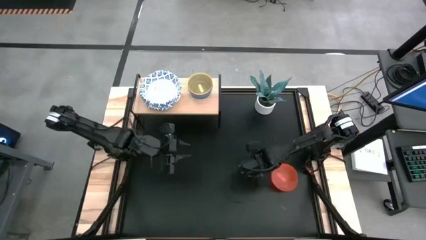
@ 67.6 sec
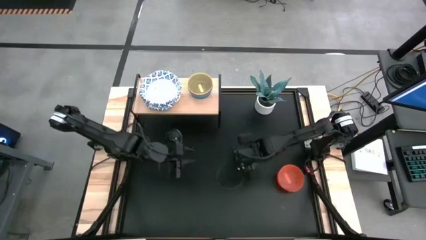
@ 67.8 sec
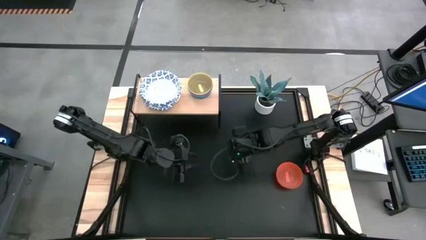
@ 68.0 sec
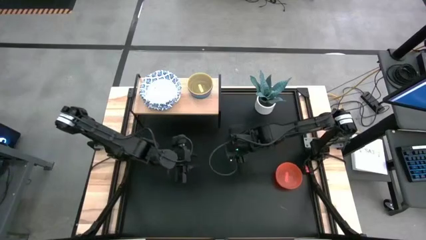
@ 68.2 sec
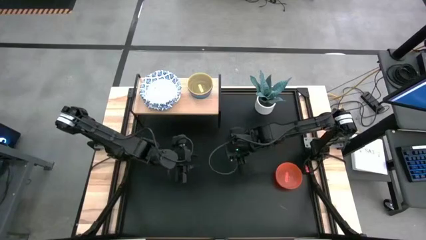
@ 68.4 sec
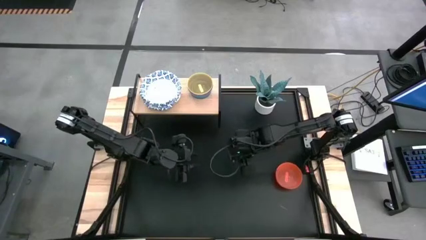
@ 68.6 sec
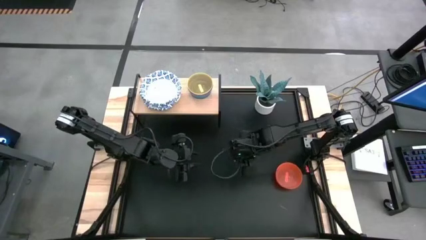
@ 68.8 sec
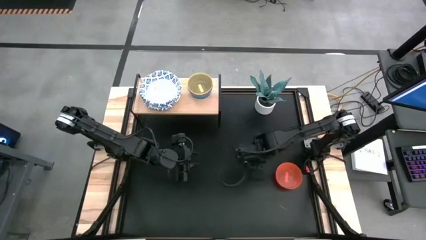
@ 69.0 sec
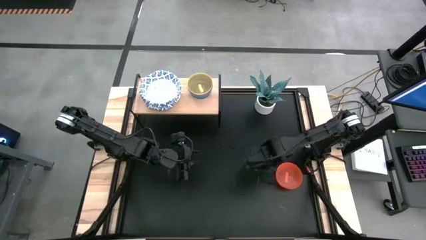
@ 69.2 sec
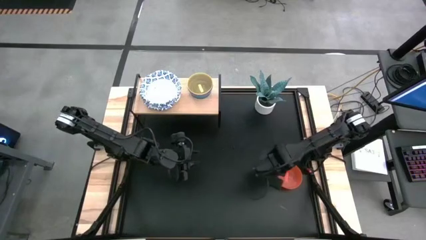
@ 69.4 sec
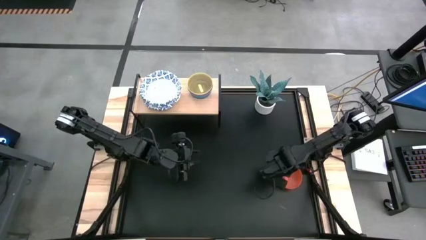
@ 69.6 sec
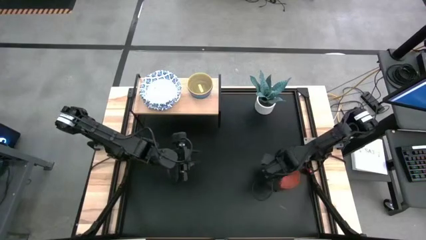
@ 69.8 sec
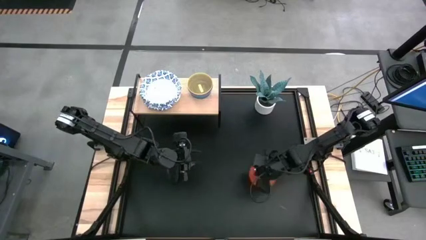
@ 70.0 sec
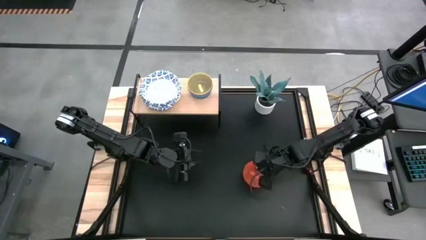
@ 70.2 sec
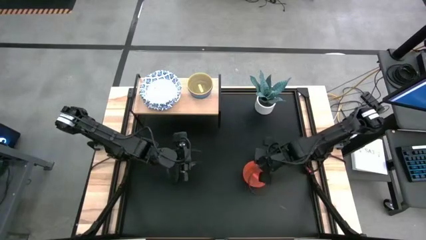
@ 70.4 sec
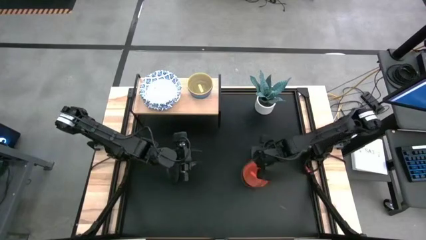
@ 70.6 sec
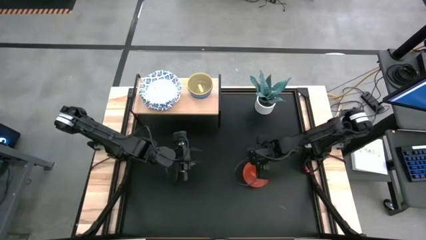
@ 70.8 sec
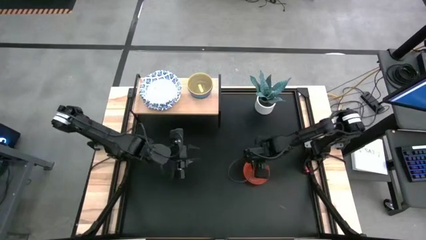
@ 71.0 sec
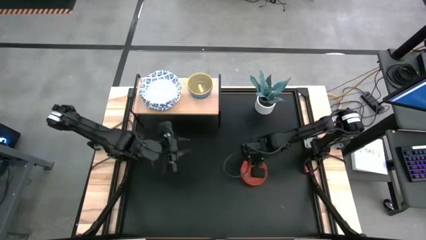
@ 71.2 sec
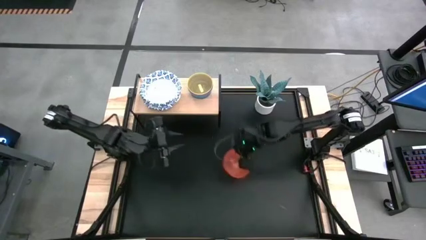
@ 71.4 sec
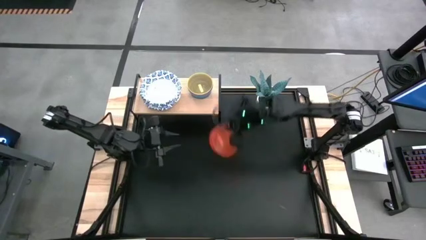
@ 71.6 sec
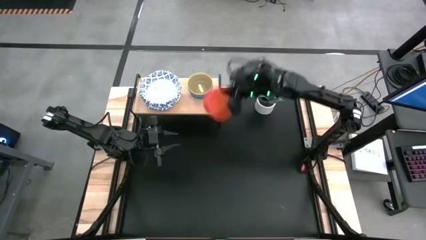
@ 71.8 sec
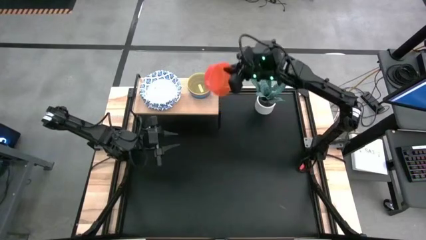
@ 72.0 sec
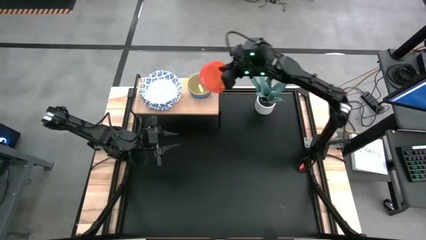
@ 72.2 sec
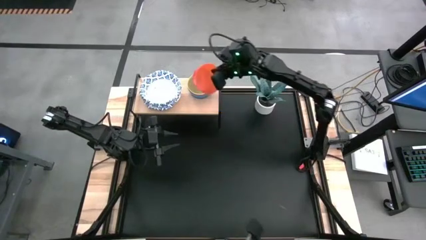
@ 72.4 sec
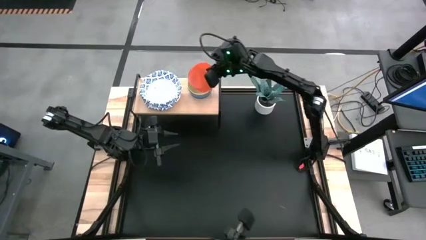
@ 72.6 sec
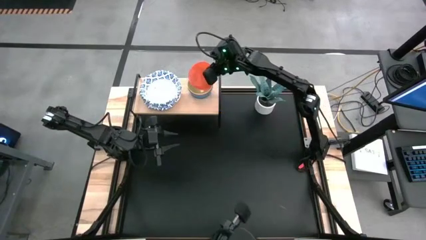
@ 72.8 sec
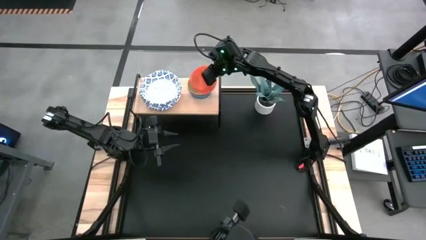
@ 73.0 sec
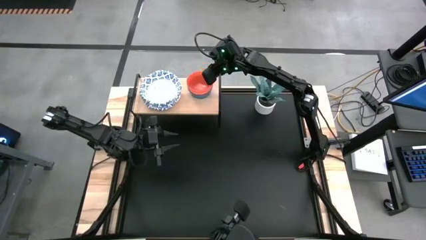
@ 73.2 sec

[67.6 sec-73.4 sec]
Task: Place and stack bowls onto a shelf
Stack the small orange bowl on top of the small yellow bowl on the shelf

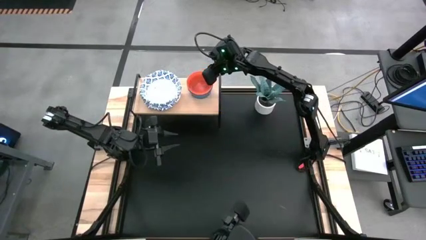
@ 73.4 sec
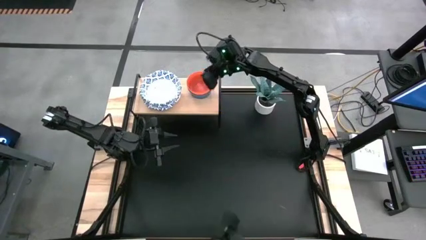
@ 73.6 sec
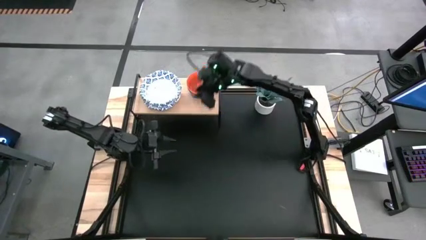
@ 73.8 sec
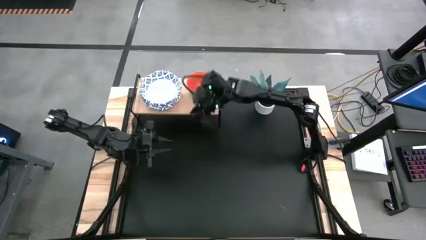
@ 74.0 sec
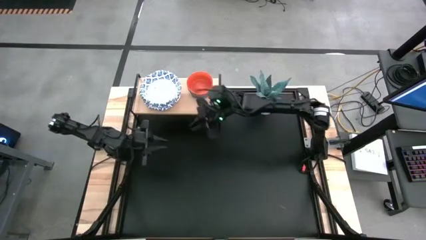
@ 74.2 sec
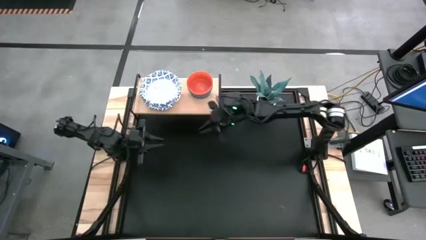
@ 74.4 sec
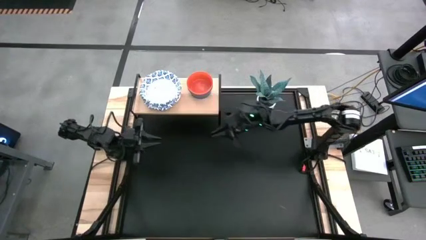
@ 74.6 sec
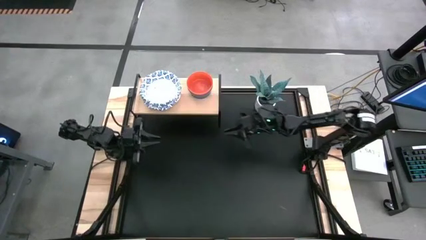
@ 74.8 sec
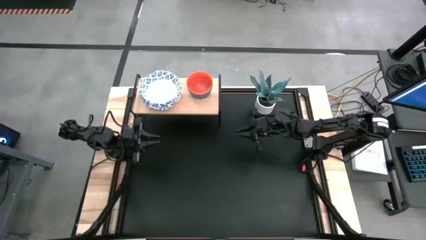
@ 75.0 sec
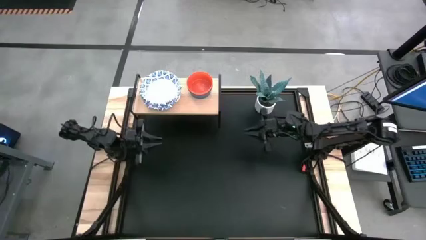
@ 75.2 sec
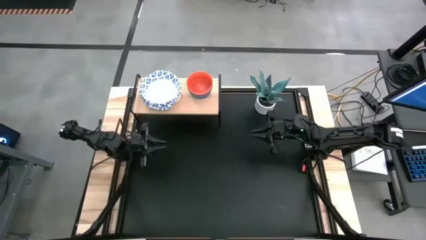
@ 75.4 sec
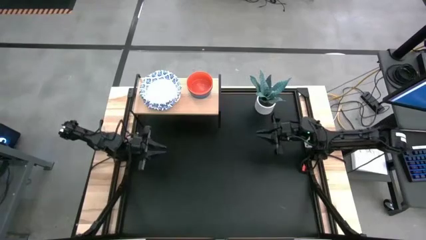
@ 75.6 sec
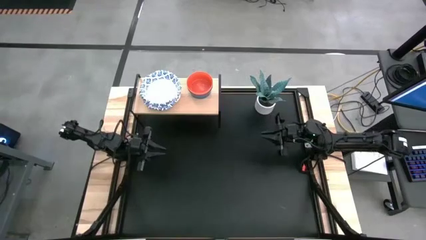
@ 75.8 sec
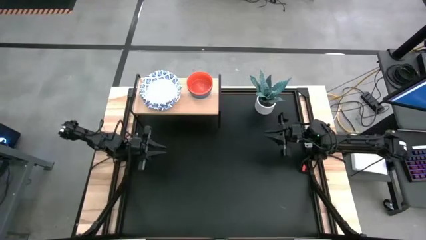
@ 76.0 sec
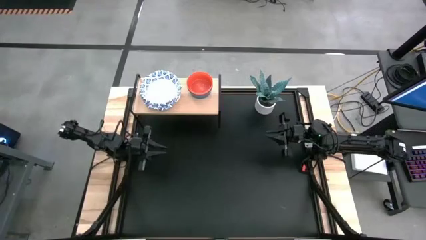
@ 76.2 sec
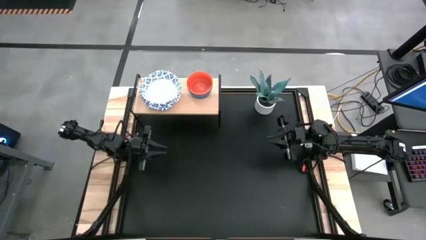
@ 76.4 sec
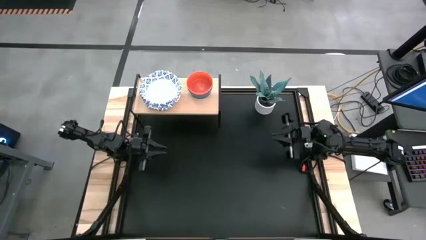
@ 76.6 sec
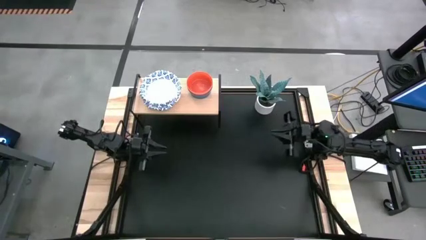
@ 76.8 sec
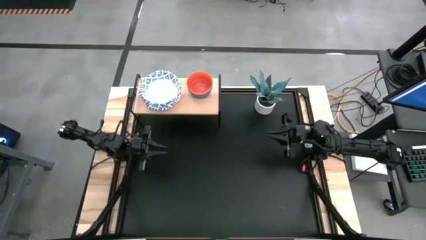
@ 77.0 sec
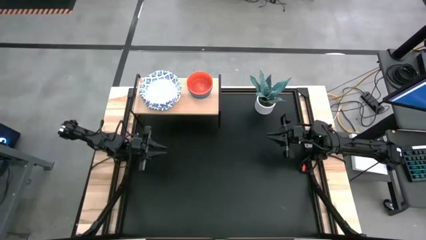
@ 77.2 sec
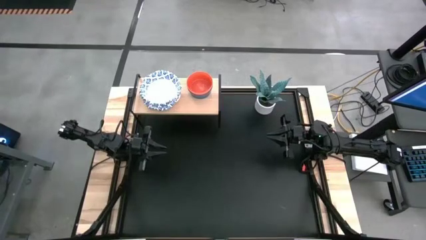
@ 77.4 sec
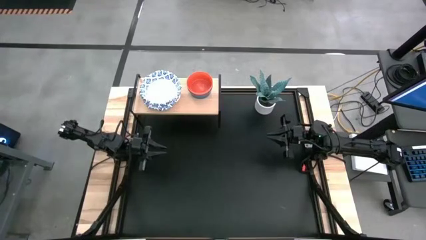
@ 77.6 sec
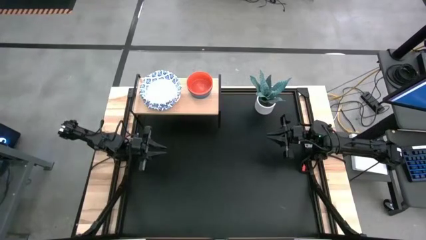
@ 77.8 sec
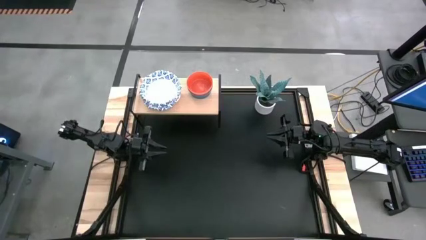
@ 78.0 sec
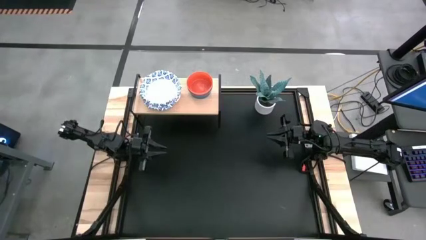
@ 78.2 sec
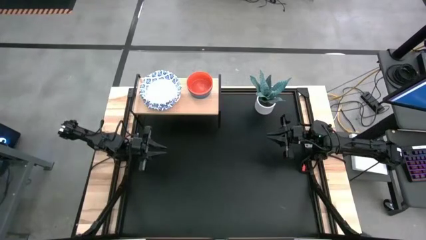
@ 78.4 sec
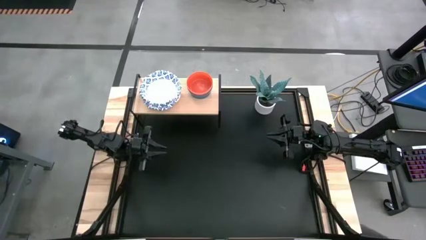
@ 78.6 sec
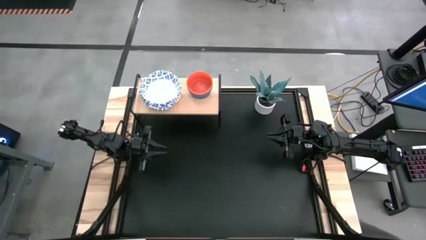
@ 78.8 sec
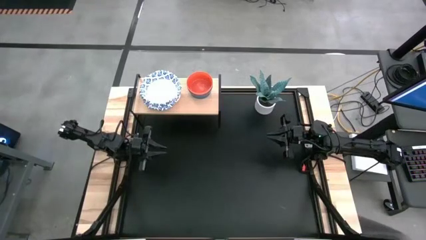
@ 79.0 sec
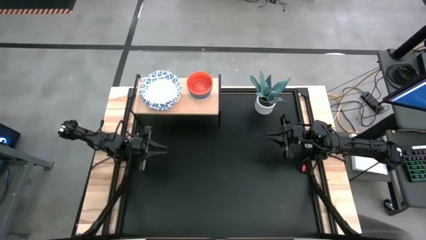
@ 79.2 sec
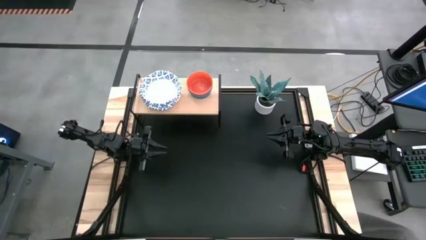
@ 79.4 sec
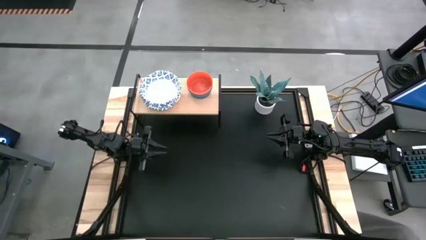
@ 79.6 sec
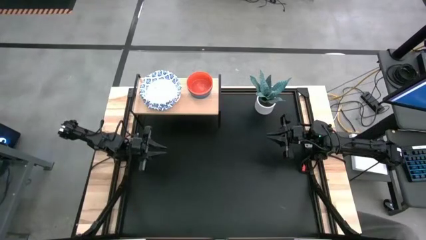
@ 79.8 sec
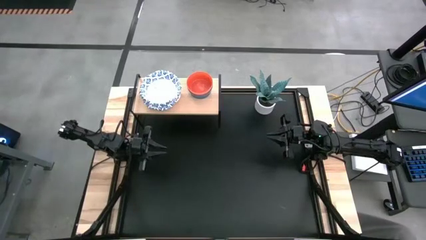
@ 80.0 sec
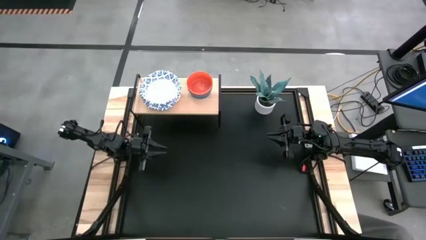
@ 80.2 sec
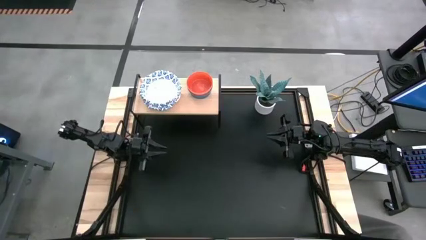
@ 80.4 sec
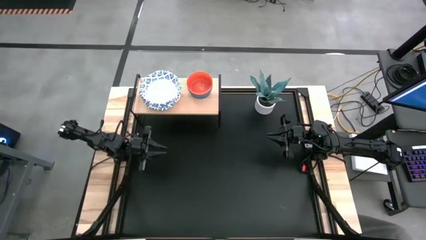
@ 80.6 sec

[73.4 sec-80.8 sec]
Return to Home Position

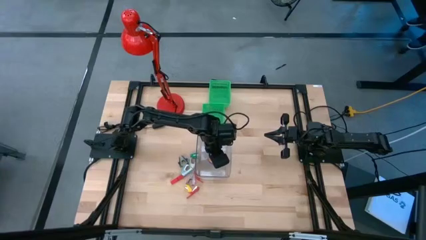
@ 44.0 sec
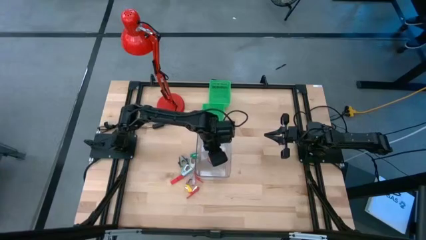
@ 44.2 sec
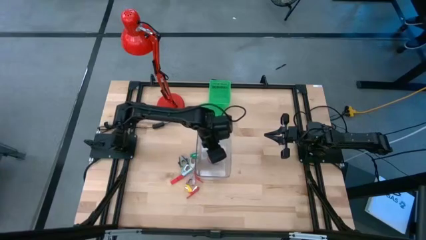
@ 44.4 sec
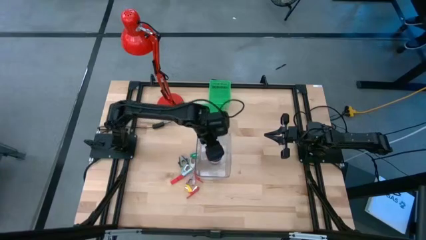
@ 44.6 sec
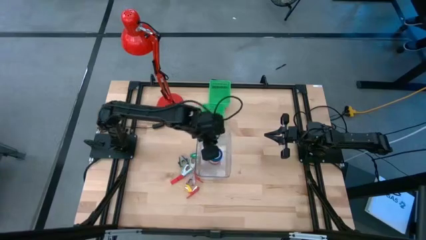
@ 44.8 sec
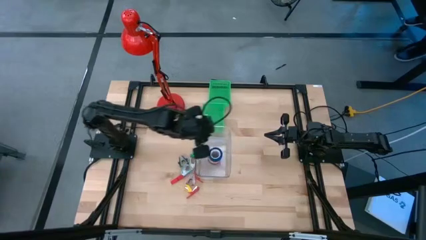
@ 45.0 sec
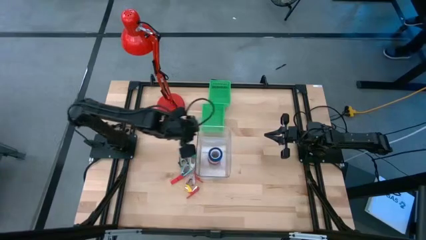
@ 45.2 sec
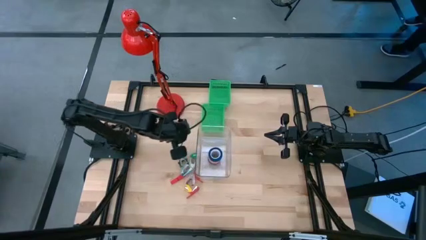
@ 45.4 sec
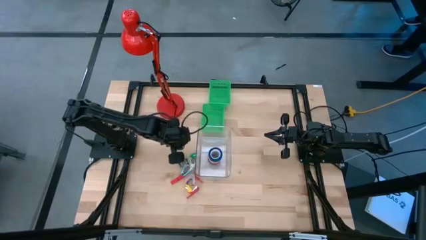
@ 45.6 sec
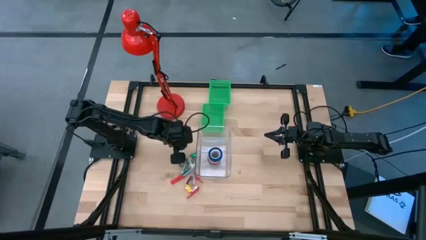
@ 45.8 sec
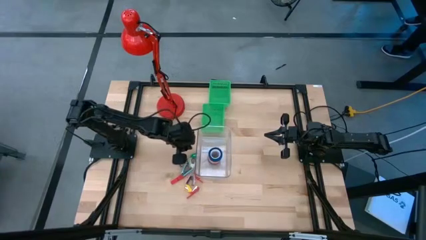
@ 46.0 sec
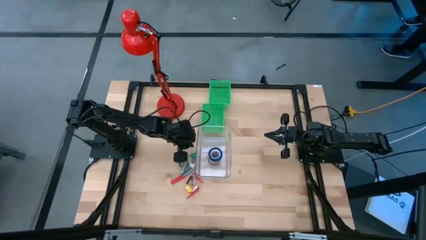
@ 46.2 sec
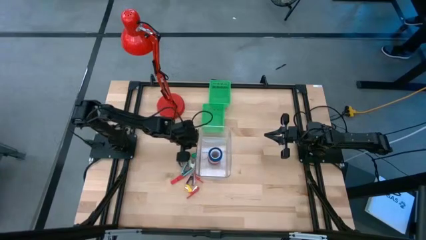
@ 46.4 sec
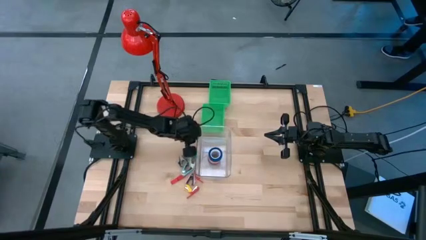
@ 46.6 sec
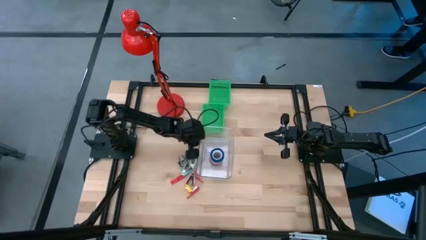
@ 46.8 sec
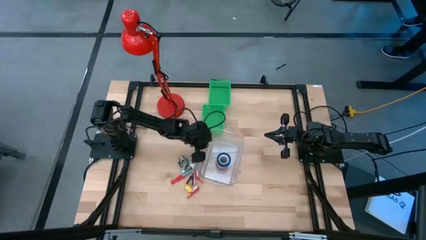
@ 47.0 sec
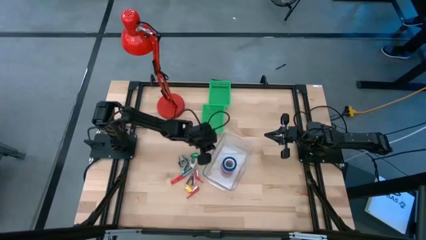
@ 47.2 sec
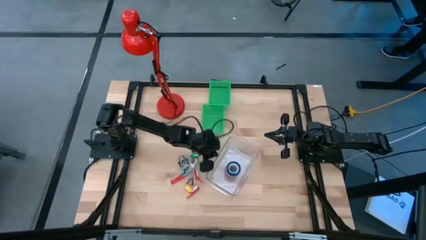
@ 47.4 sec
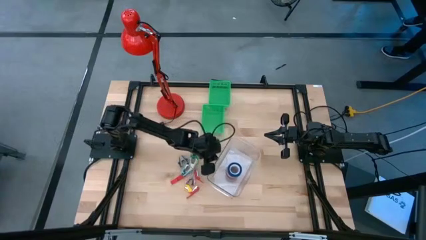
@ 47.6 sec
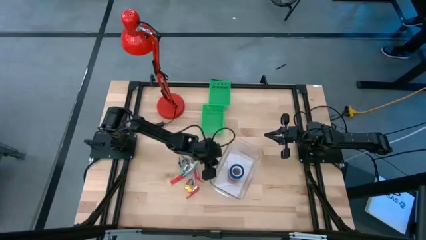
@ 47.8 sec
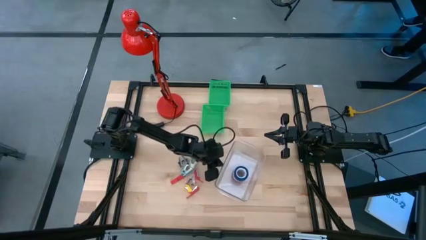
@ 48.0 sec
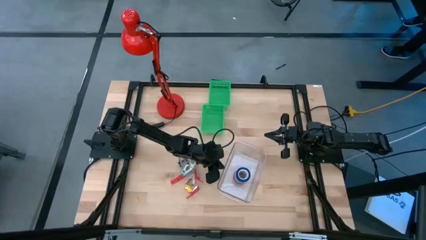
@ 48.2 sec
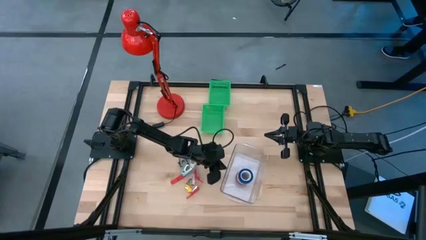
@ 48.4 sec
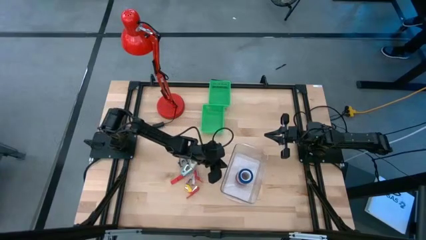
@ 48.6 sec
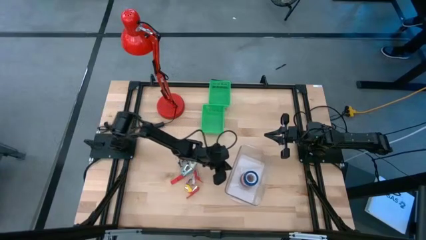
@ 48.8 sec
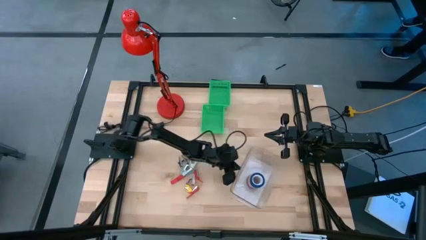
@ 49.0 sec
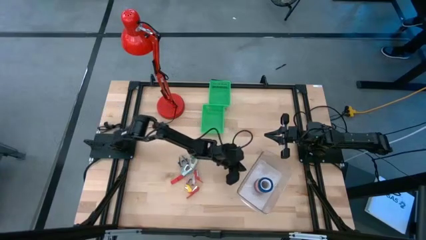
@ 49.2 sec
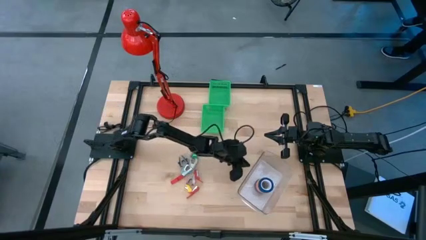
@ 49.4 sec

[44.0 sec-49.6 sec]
Task: Pick and place Stapler, Stapler remover, tape
Move the transparent bin to the bottom right of the table
